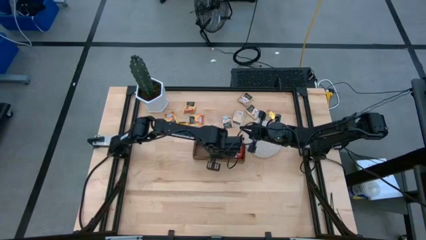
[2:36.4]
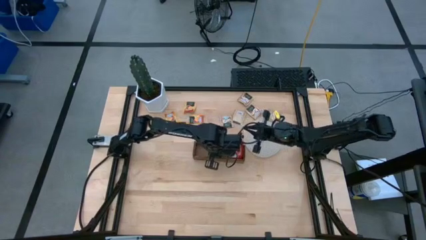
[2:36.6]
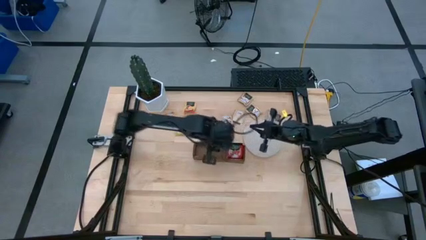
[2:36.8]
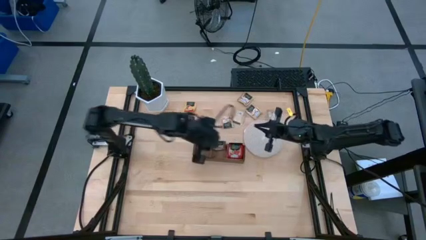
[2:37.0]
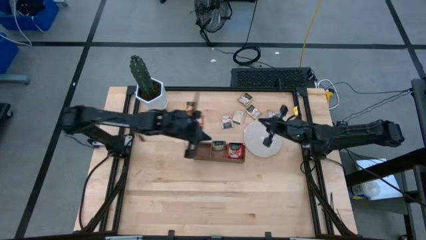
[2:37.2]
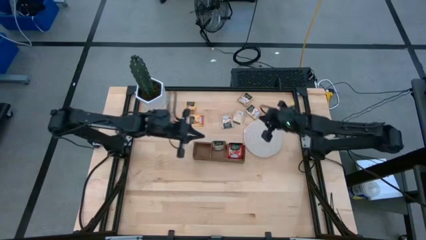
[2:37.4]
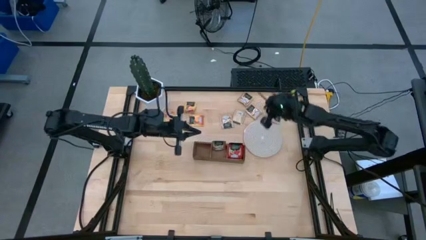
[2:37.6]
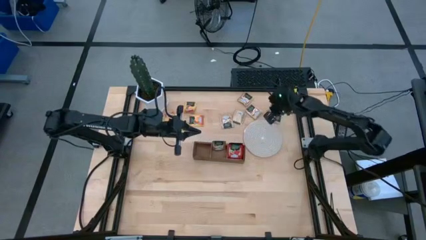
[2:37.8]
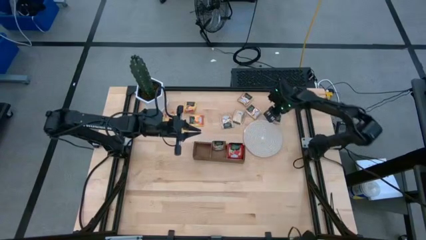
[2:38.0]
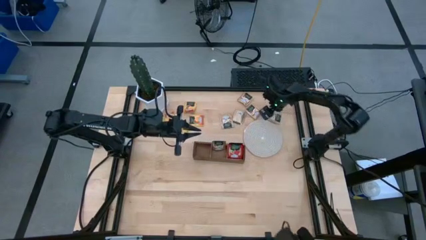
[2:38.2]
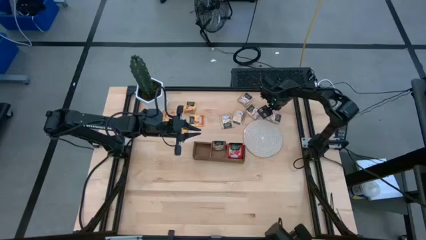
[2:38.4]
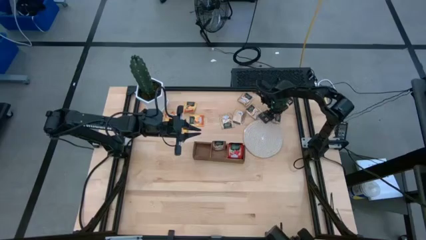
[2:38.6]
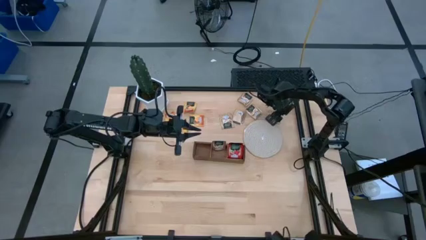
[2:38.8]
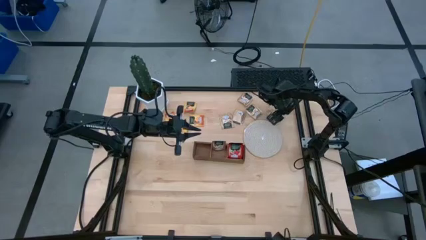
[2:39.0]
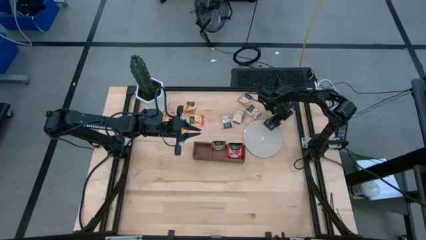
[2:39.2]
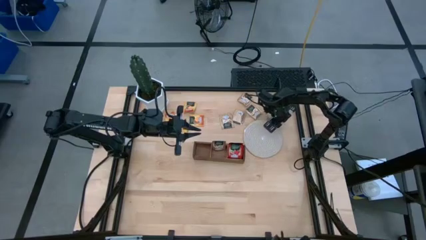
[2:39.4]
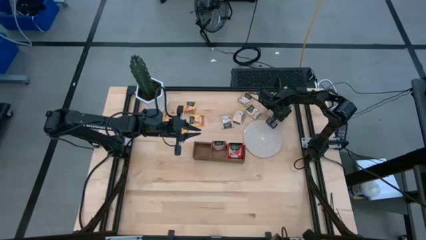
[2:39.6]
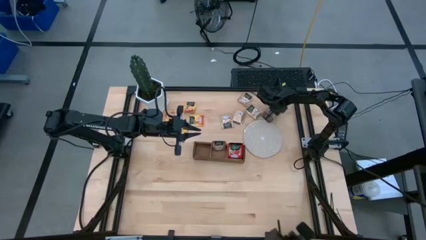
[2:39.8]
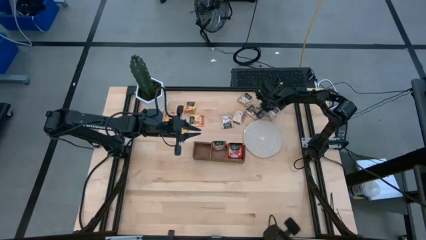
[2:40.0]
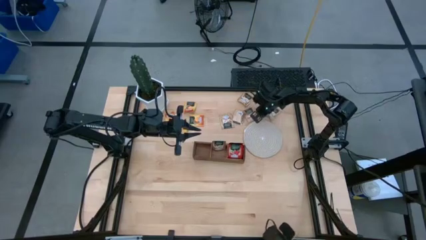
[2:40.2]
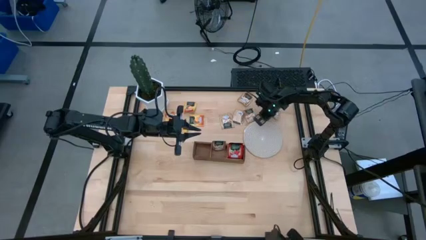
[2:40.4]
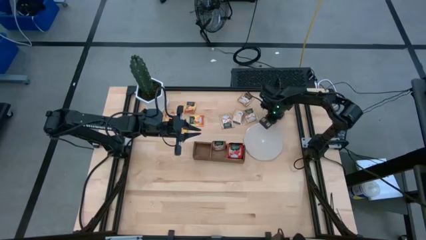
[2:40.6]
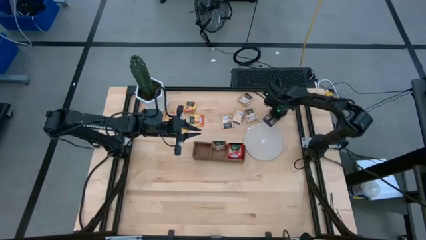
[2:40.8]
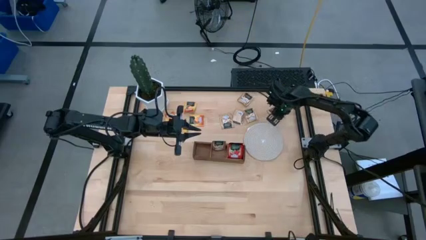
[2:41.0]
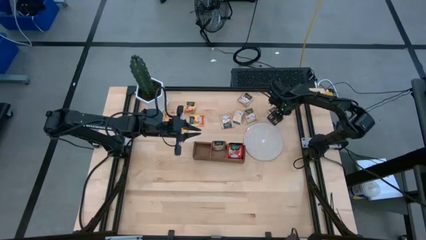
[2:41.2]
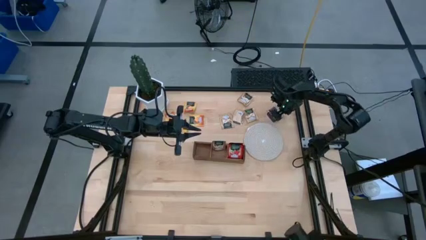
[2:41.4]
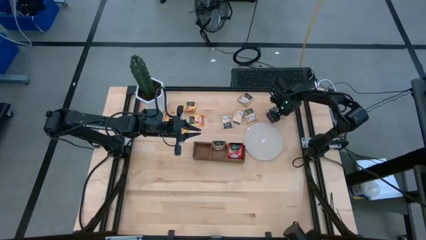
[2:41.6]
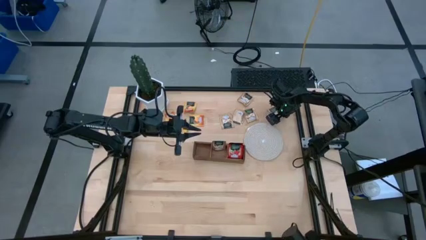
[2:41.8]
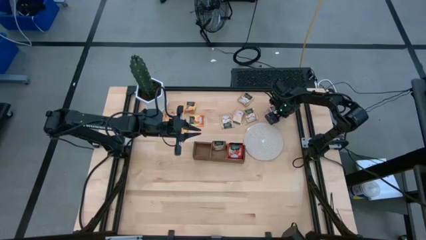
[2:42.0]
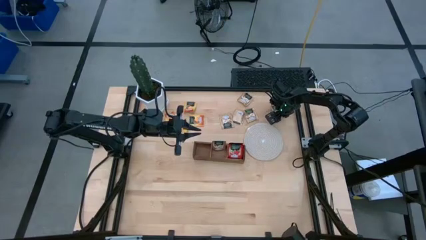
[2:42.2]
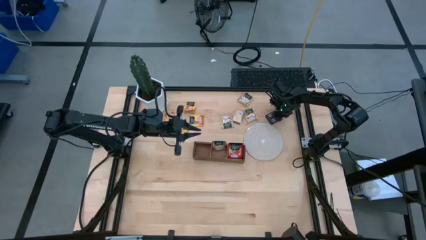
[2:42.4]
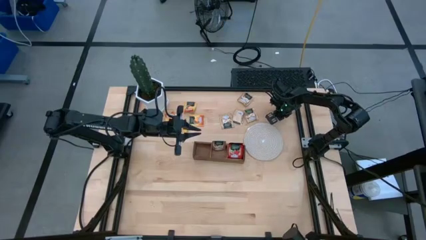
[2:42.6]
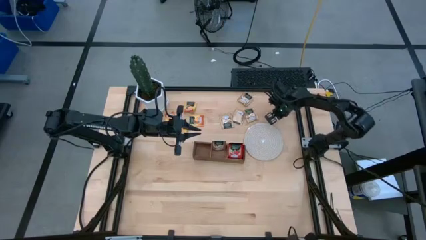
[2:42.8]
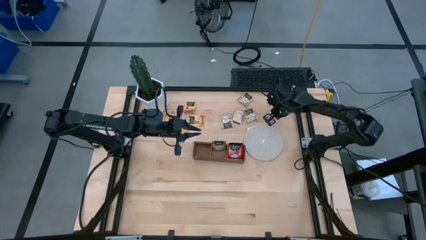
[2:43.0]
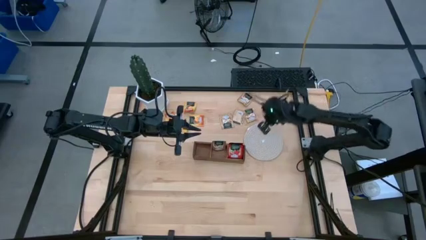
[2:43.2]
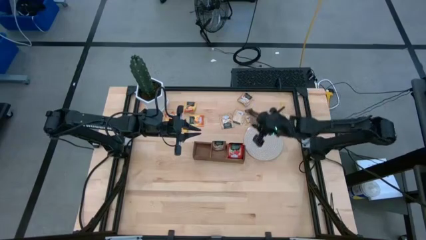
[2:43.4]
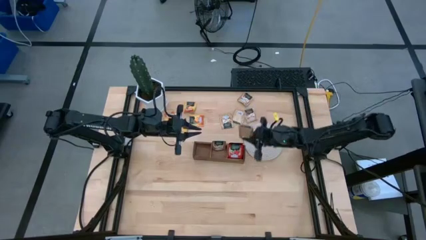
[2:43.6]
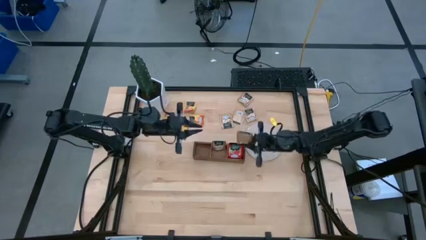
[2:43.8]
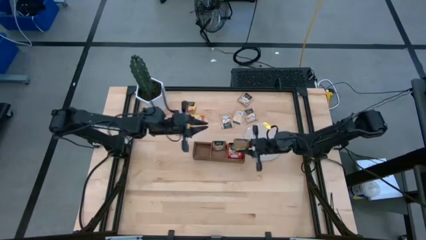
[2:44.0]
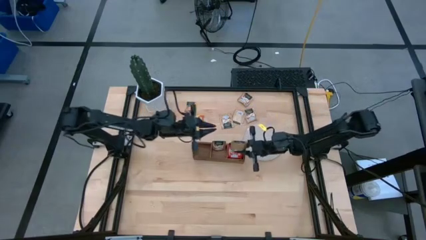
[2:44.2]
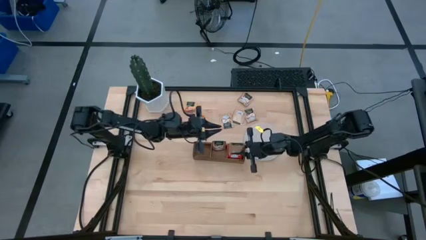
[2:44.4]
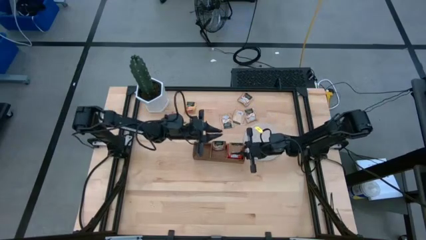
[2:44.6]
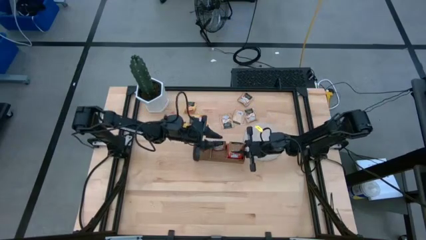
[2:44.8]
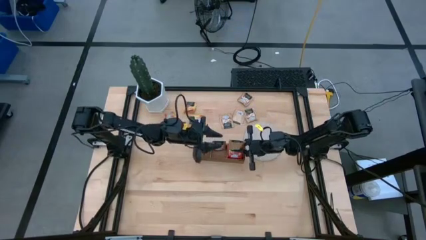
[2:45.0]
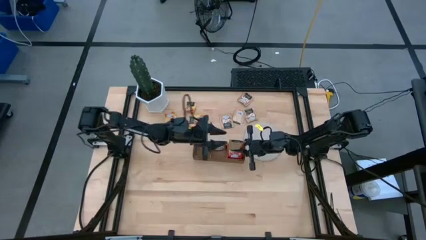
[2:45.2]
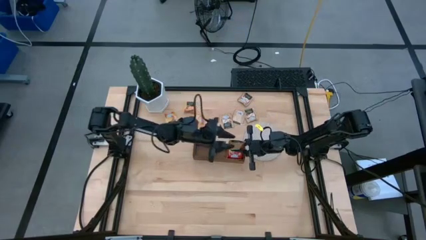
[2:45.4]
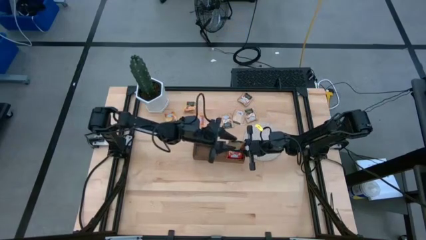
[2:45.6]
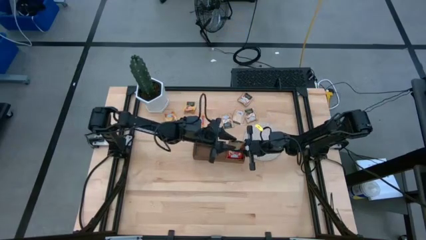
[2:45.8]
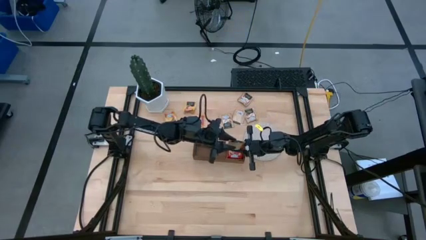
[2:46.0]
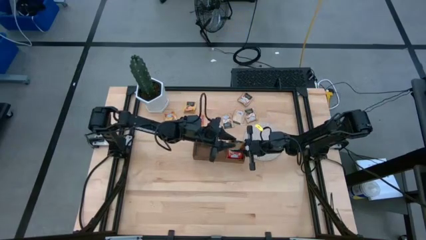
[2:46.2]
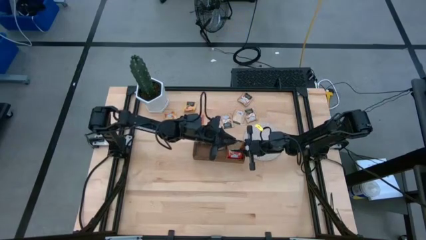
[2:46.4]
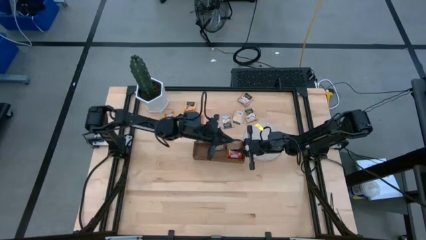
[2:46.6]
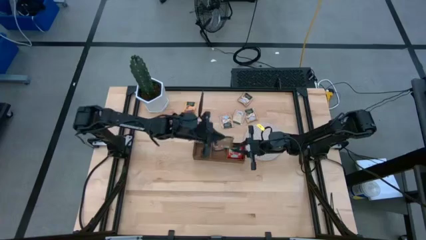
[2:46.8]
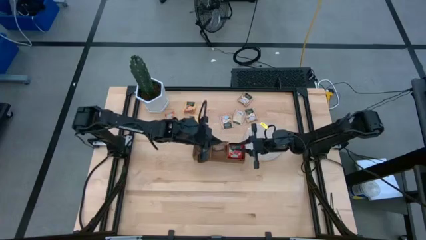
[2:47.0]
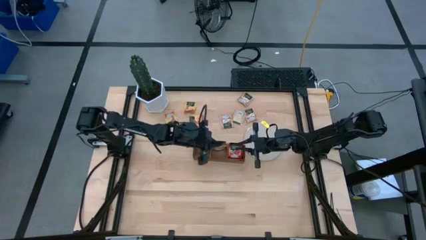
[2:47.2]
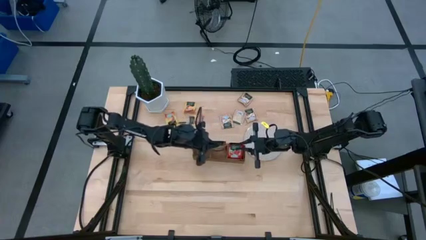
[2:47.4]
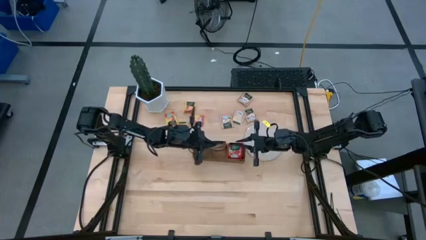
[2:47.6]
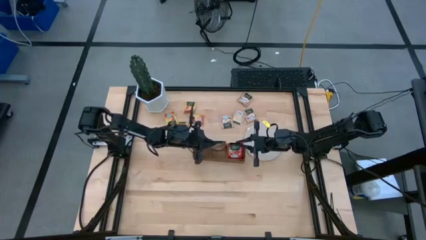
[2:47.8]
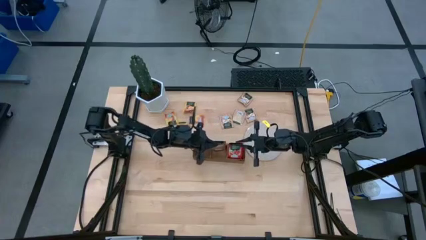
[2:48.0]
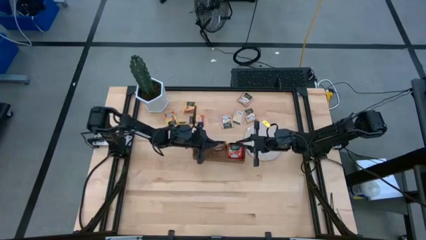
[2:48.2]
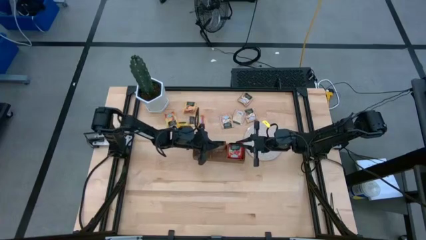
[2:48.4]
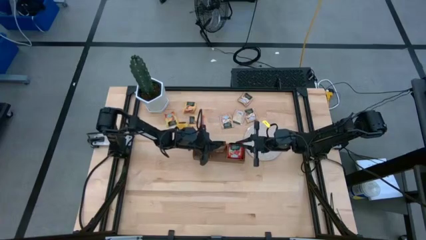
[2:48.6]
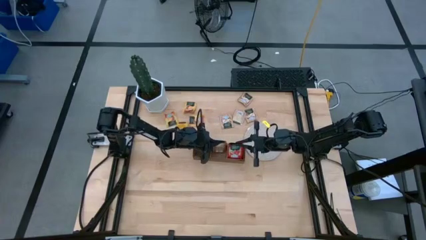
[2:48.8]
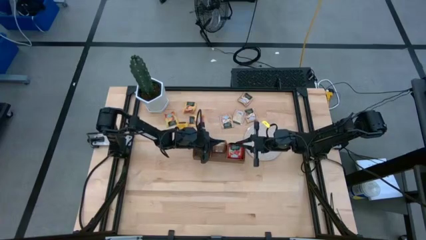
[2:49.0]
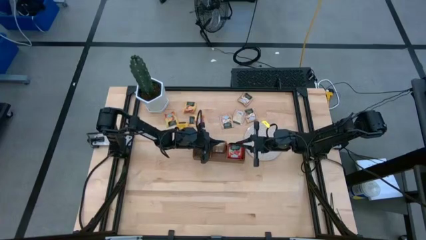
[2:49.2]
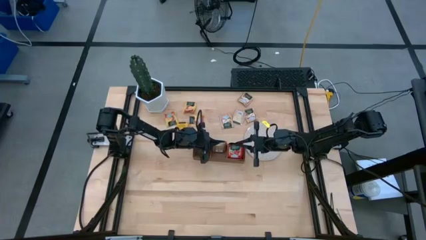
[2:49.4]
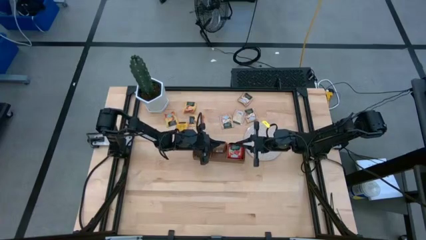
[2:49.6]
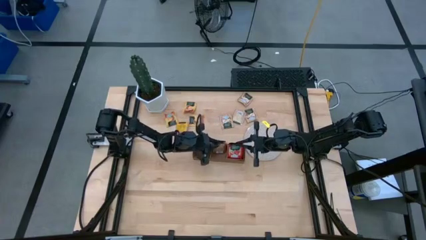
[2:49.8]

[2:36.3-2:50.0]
Task: Pick & Place Tea
Put the brown tea bag into the middle section of the wooden organizer

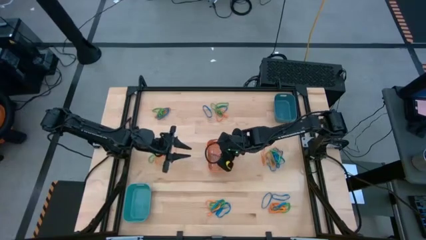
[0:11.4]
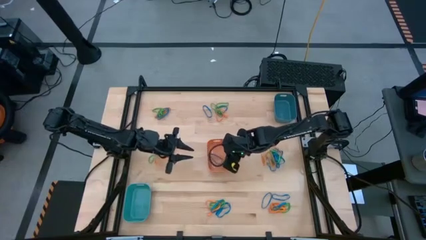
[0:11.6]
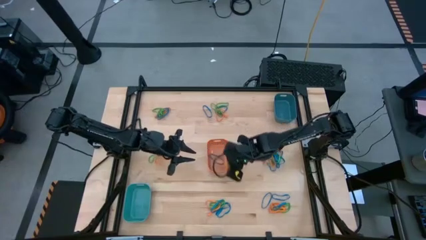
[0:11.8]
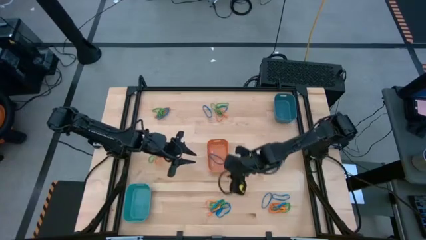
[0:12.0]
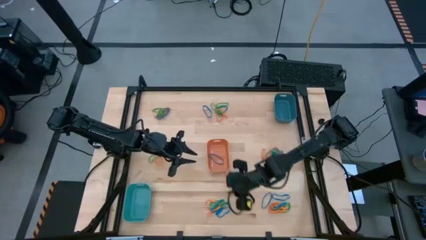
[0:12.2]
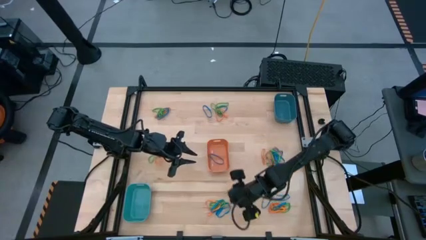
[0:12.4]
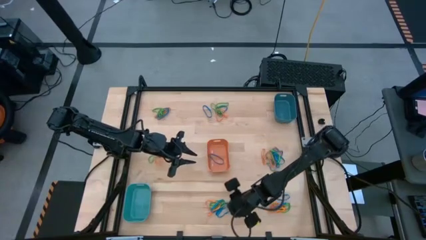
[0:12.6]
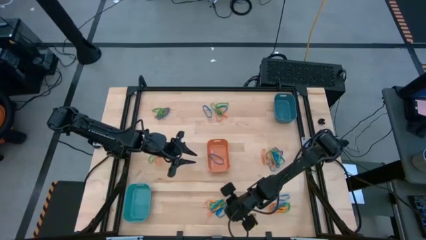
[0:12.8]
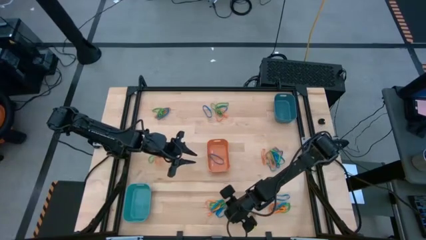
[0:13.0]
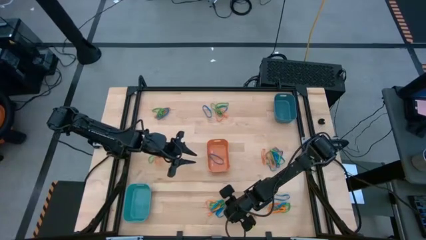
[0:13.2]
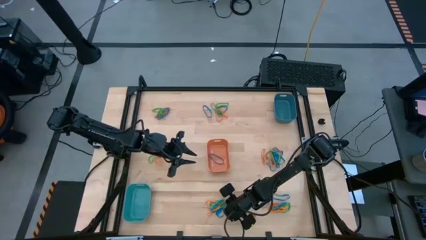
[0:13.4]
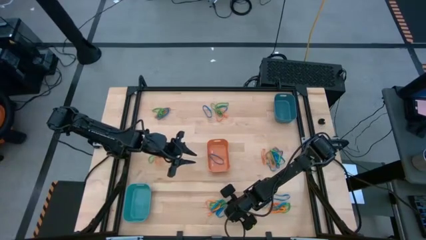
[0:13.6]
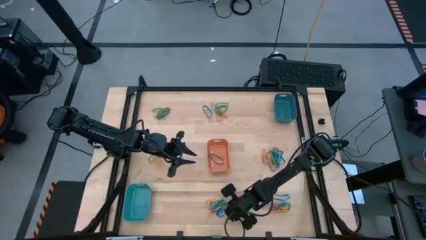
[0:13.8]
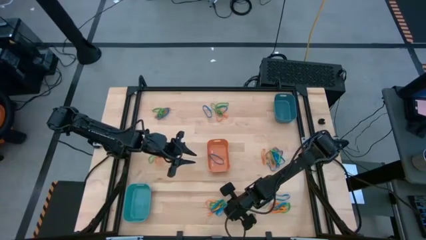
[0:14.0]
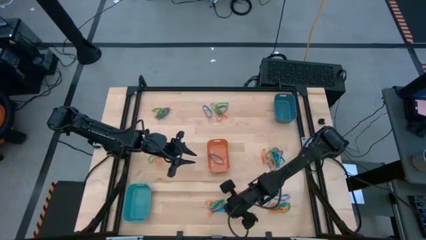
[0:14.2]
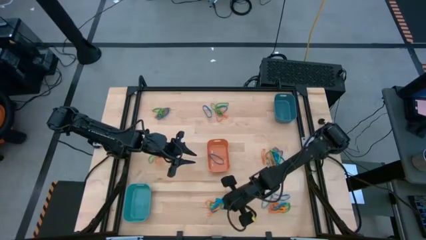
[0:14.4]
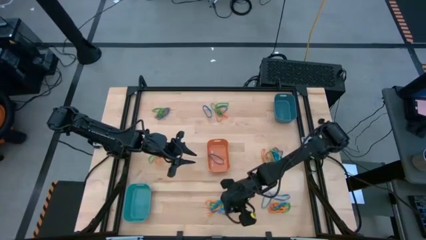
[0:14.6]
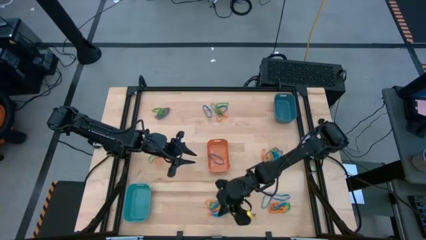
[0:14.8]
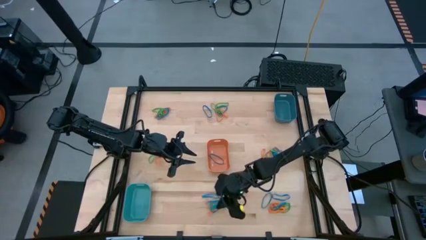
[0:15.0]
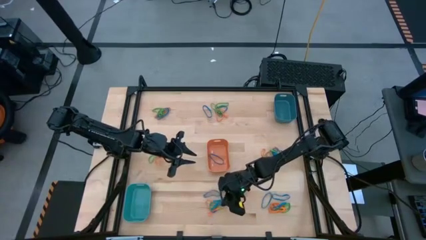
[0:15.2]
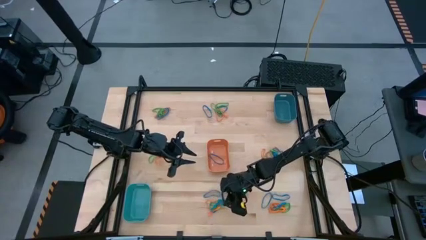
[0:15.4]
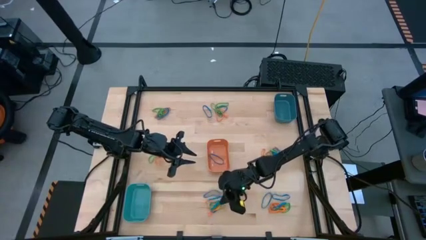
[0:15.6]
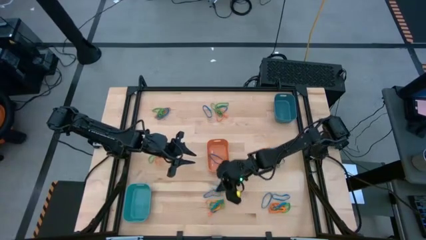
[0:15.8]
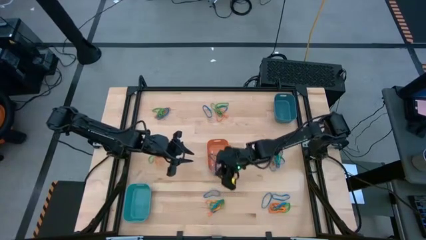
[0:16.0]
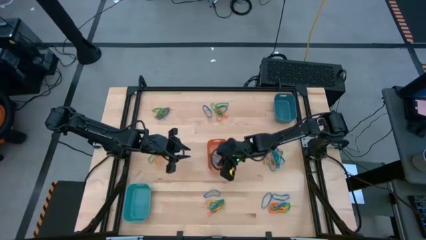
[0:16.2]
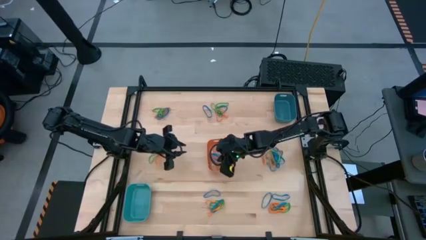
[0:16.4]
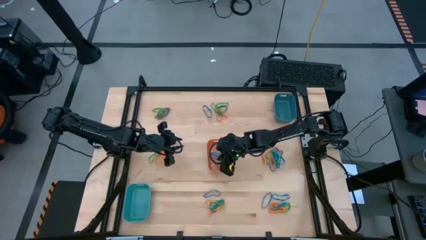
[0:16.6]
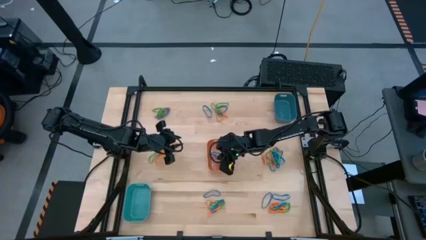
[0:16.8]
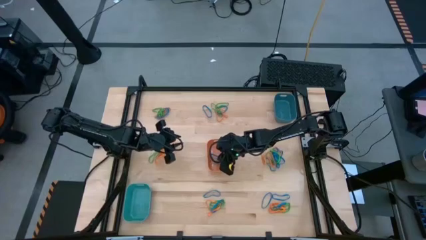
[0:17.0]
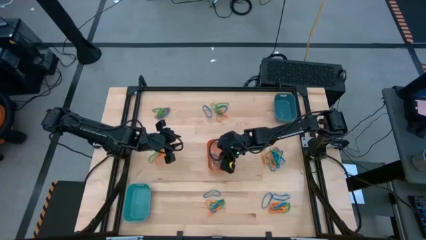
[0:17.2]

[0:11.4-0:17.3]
Task: Sort rubber bands into baskets
Put the blue rubber band into the orange bin
